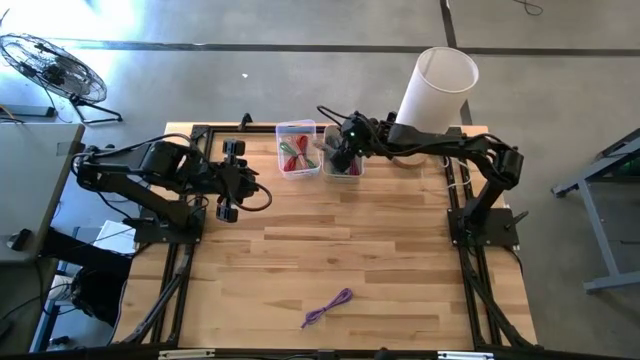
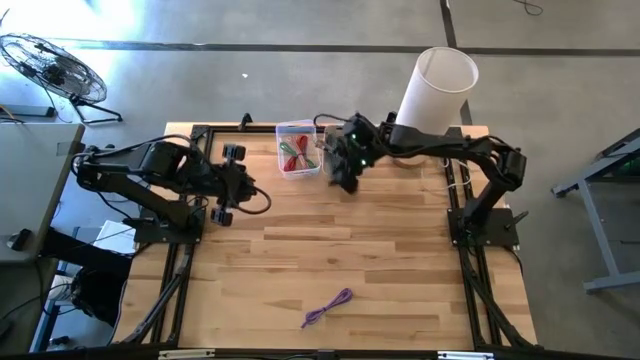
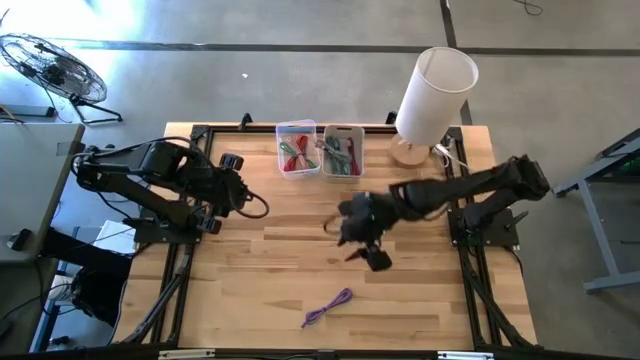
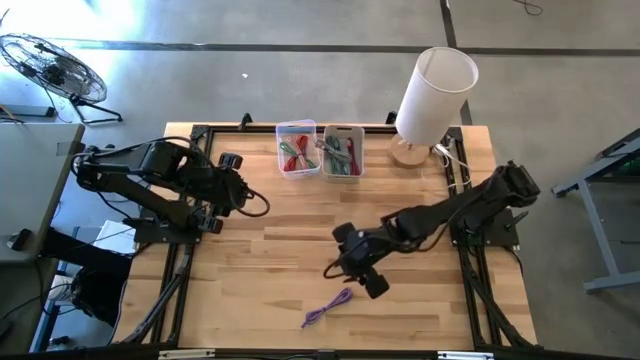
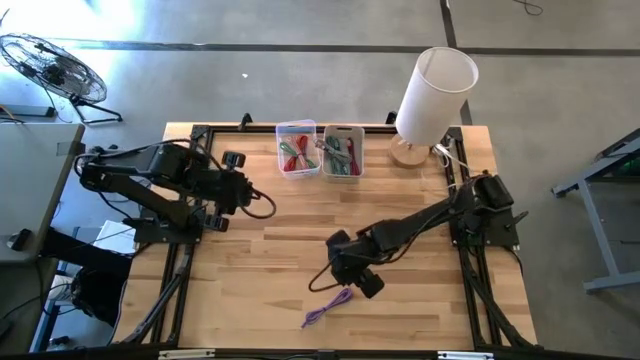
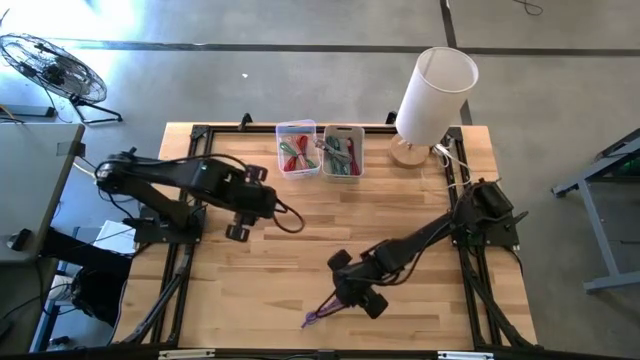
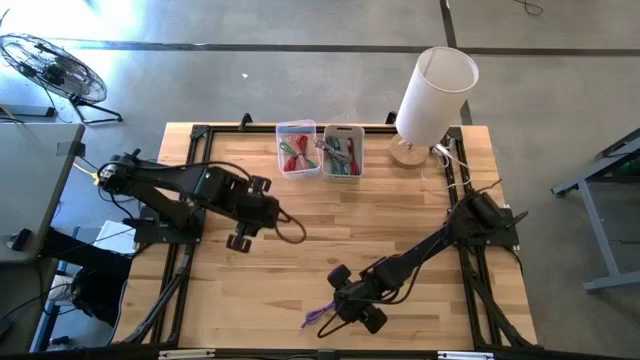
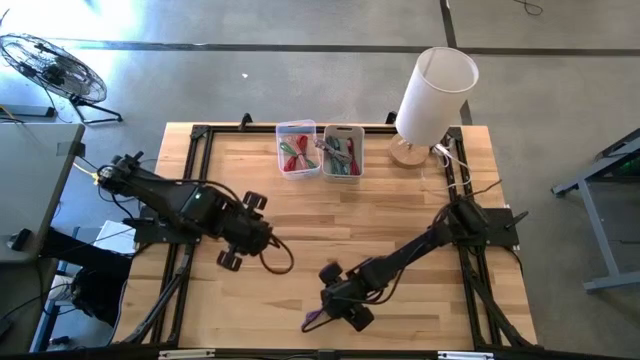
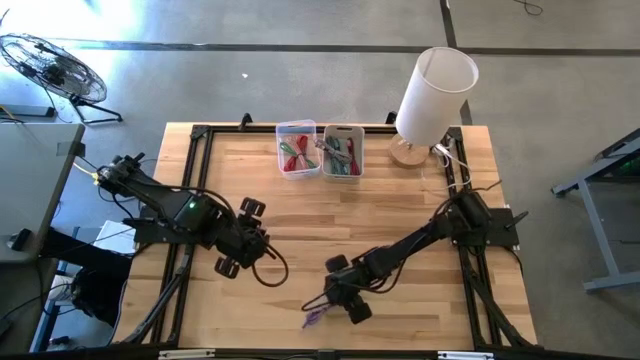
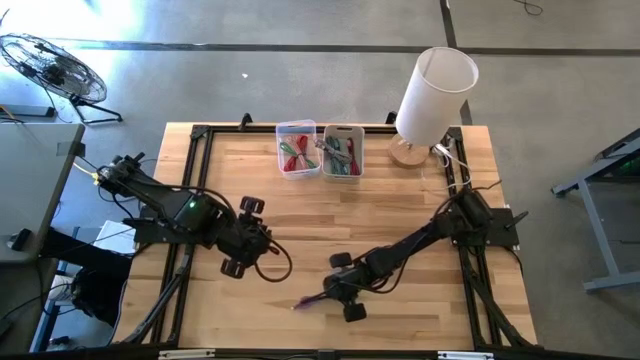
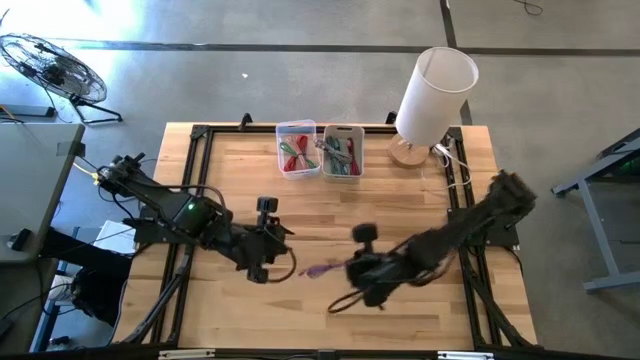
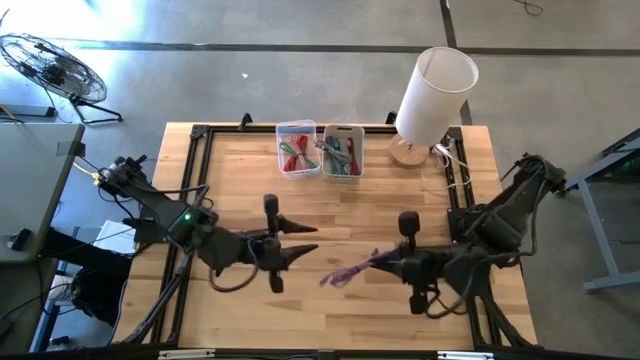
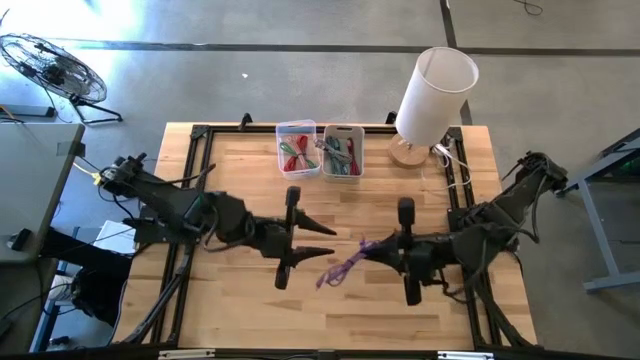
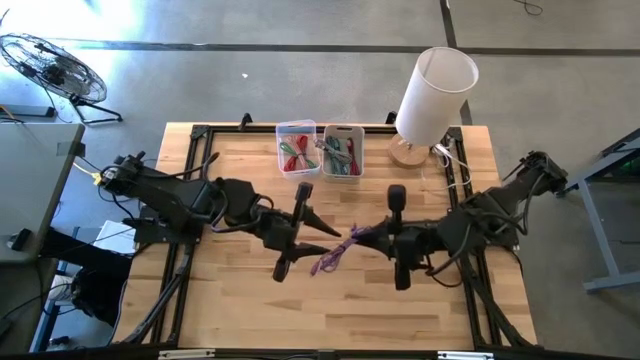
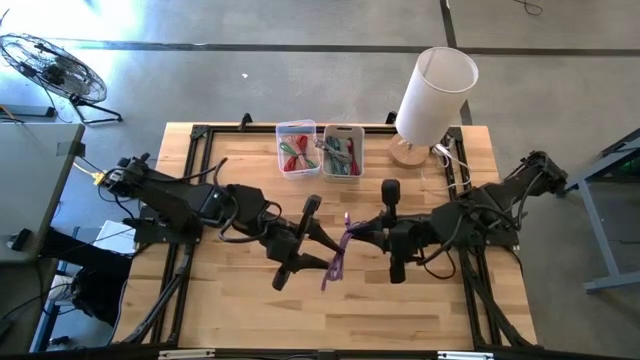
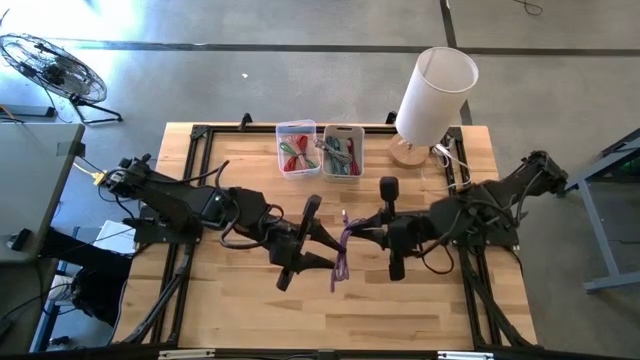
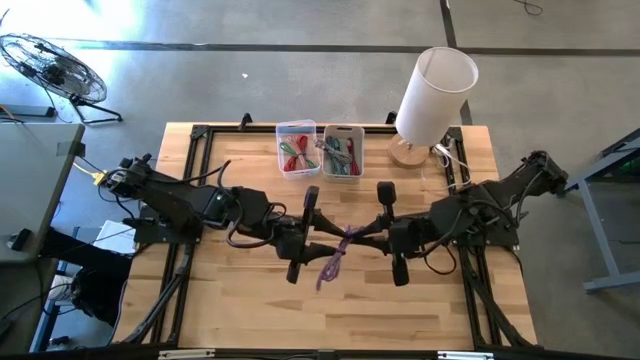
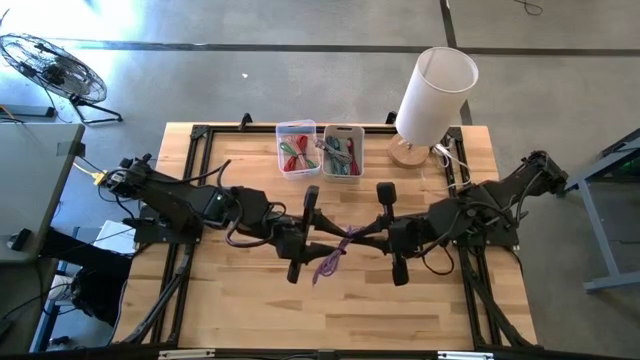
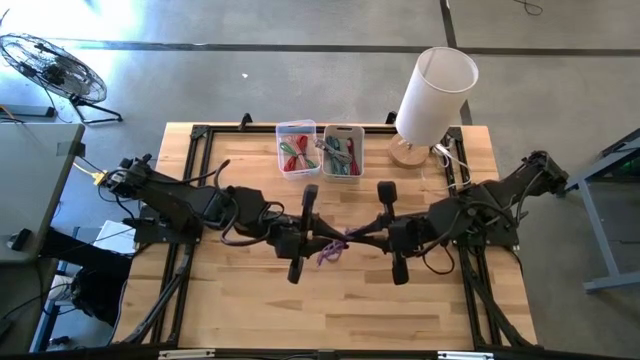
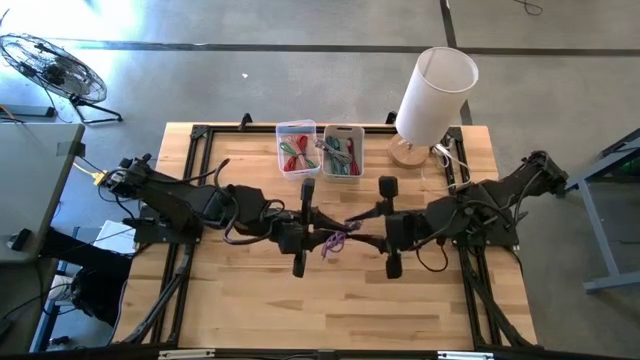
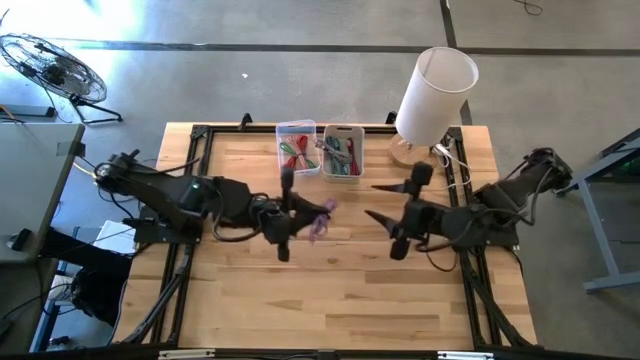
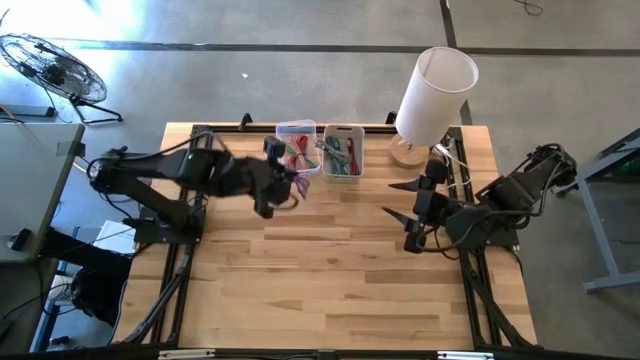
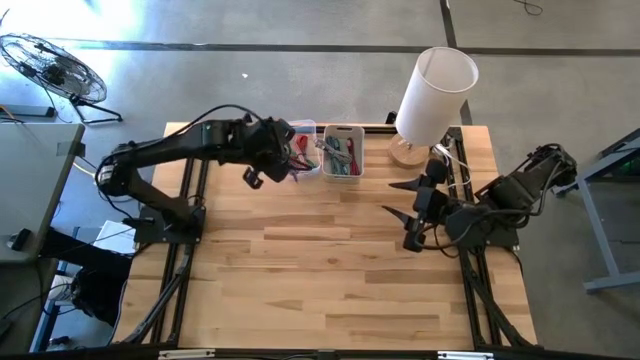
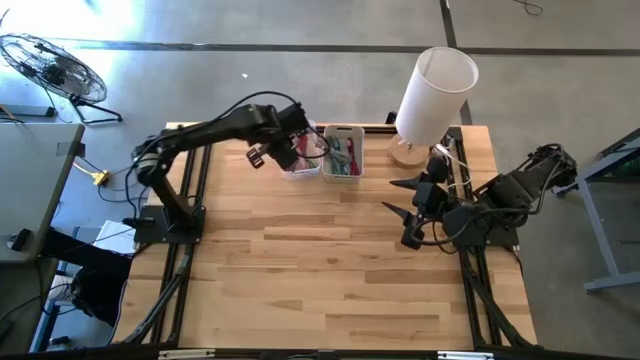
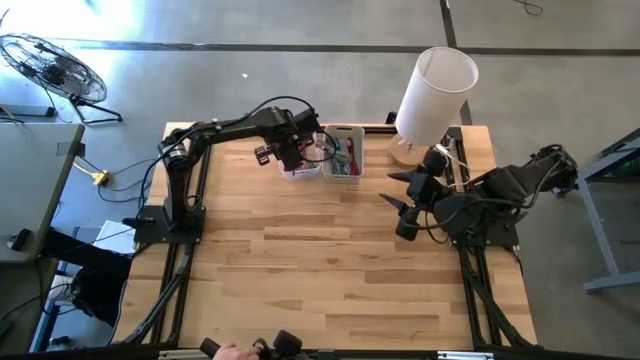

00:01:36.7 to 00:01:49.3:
Task: Pick & Place USB Port
Put the purple cable into the transparent bin

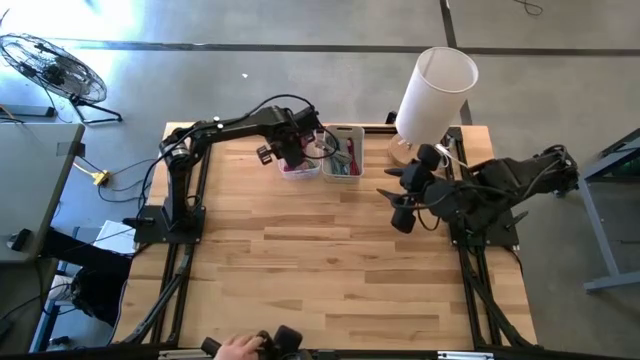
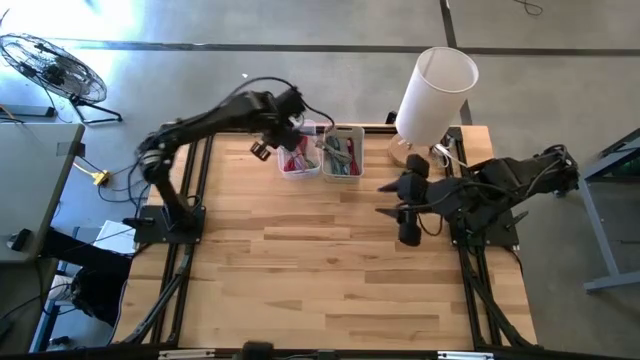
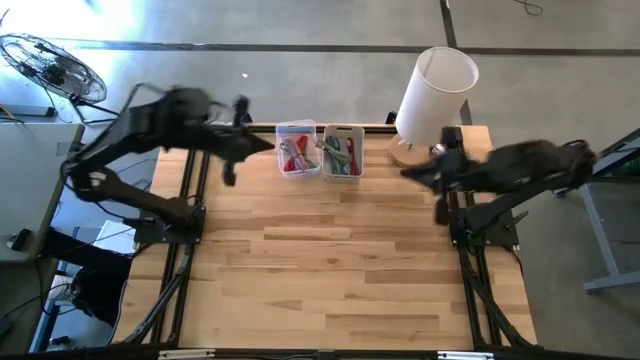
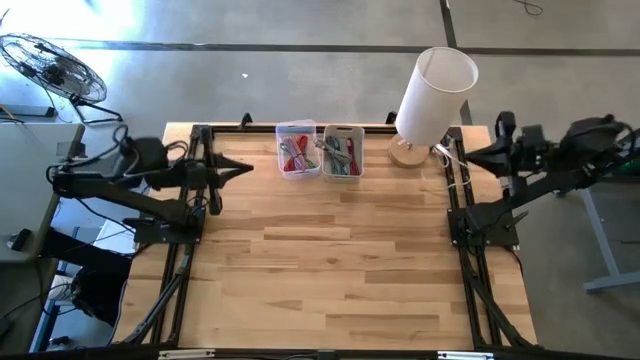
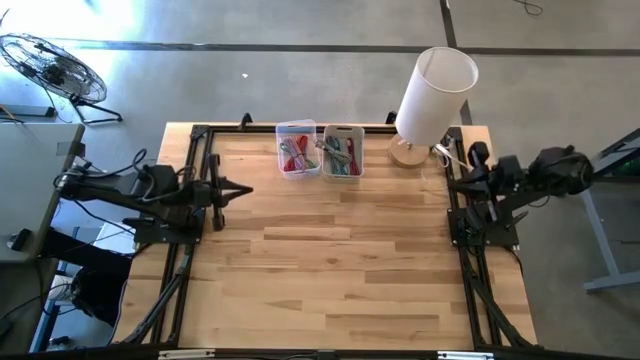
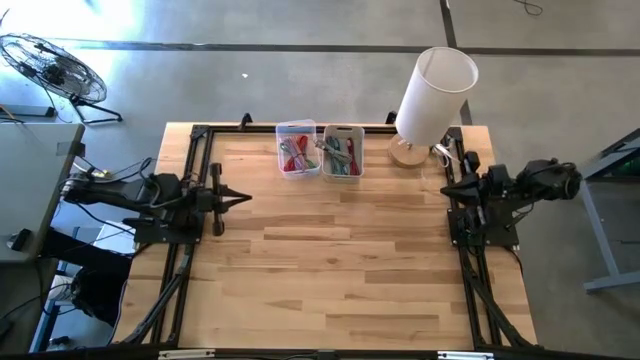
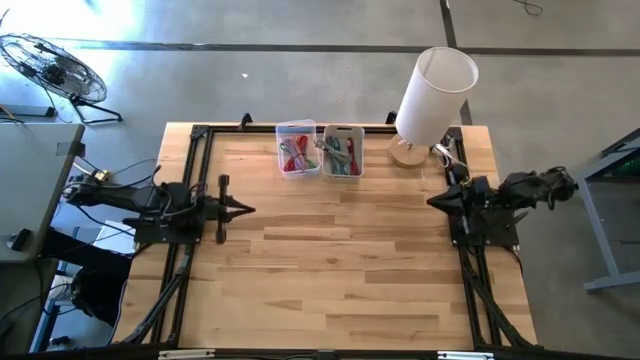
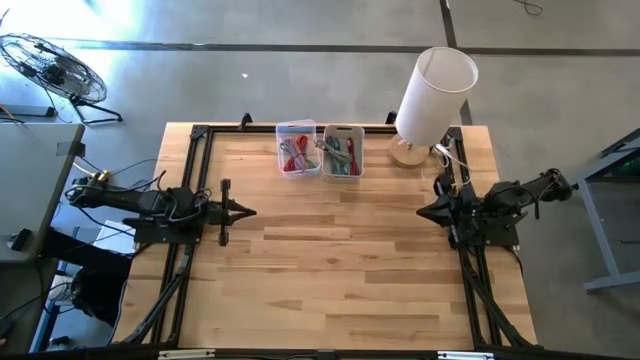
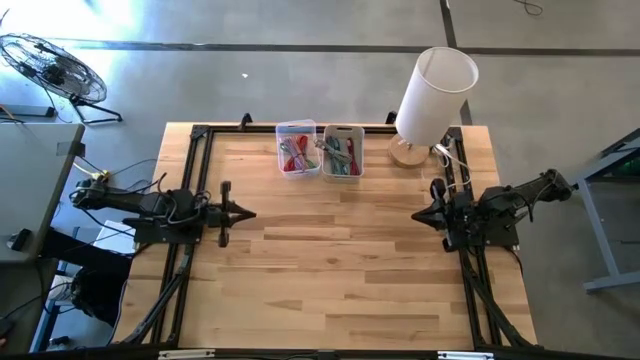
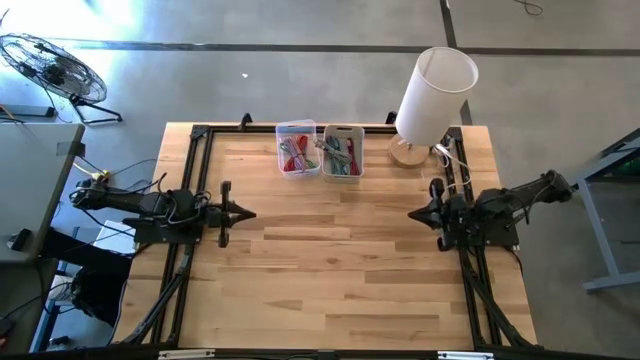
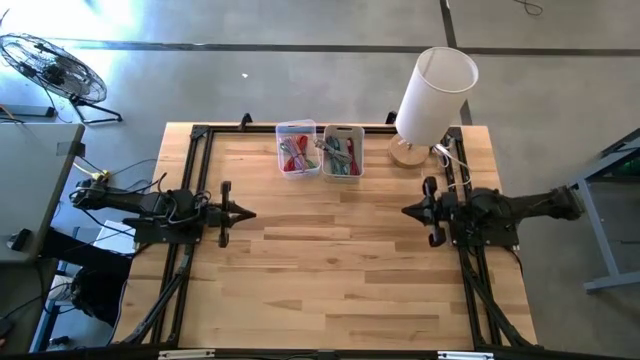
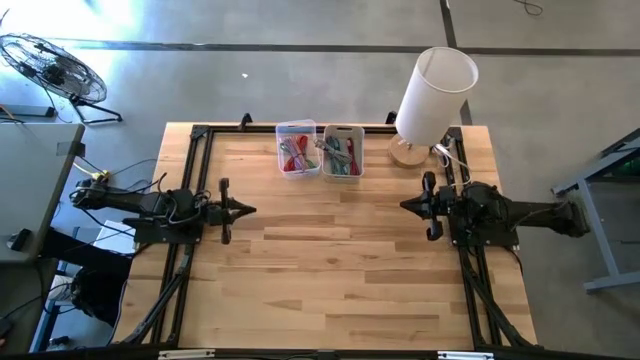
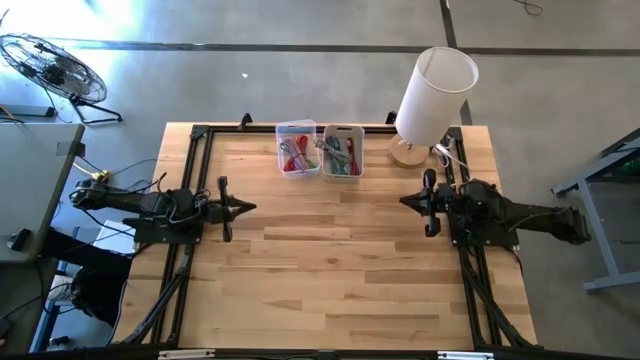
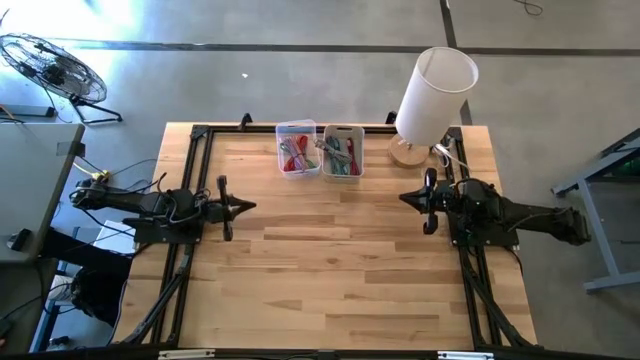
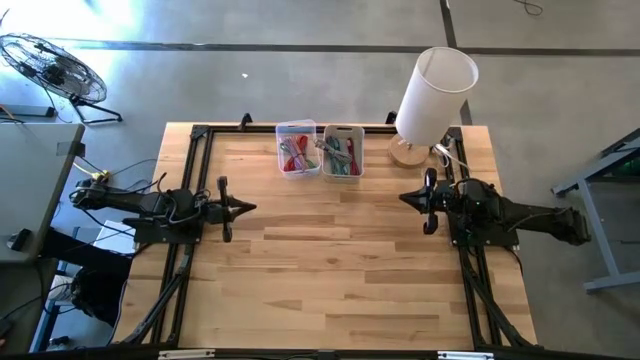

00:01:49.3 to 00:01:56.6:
Return to Home Position

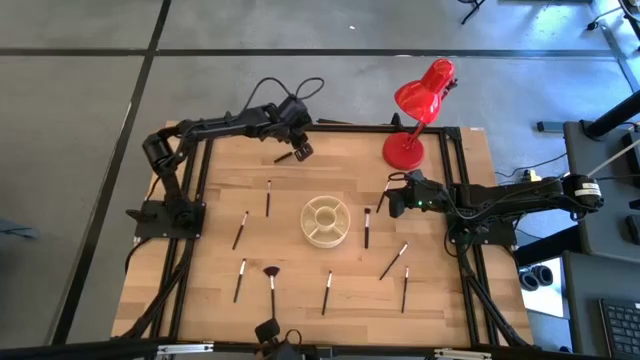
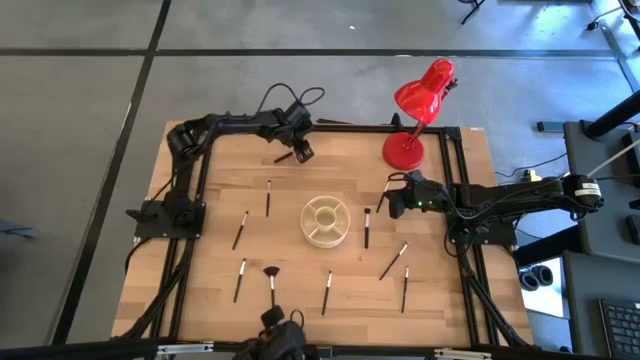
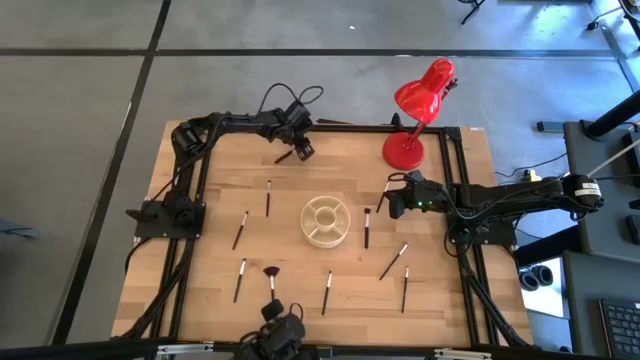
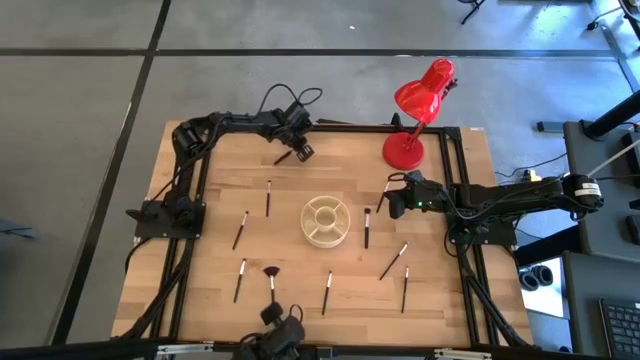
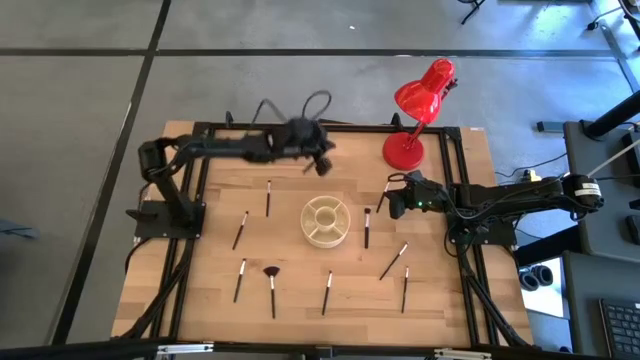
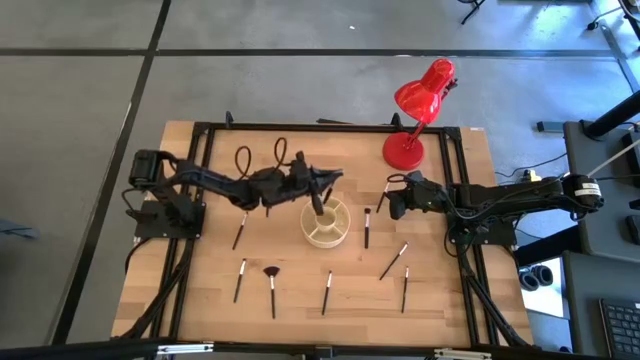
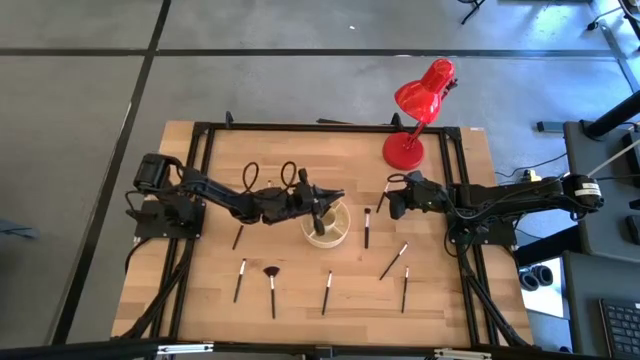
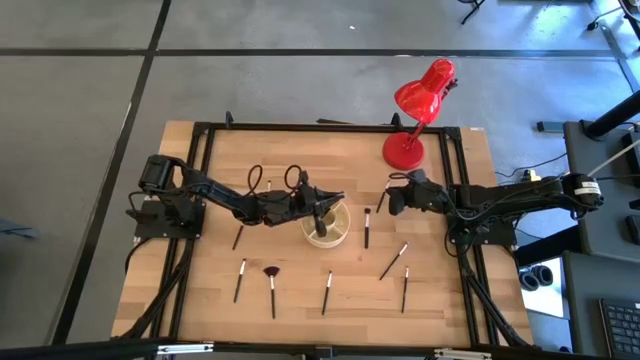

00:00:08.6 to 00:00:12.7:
Task: Put items in baskets/containers
Put the black powder brush into the white brush holder
